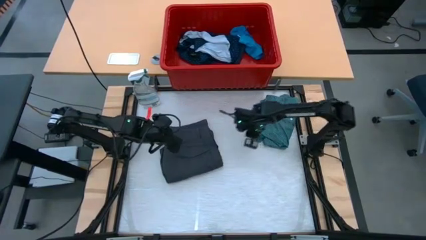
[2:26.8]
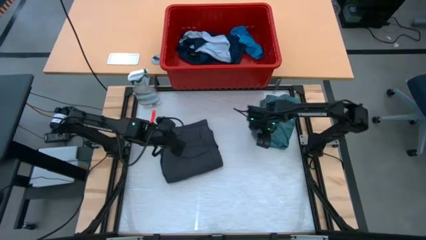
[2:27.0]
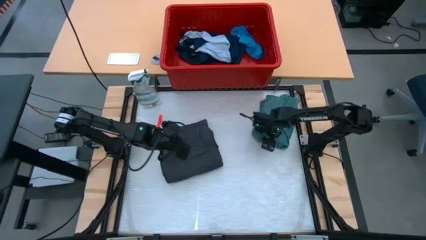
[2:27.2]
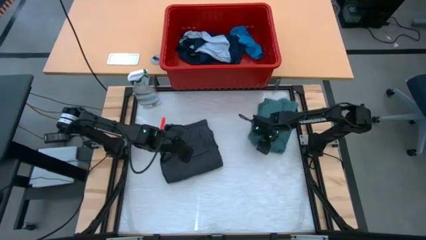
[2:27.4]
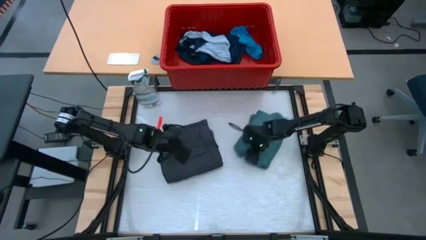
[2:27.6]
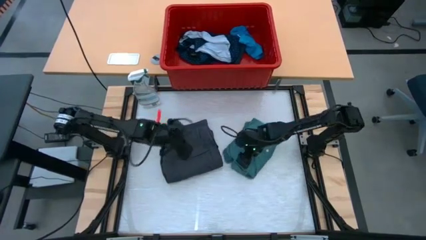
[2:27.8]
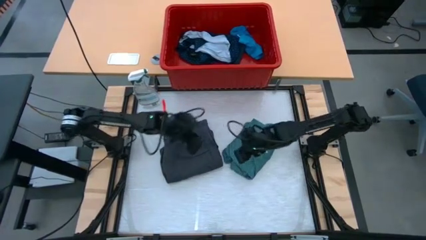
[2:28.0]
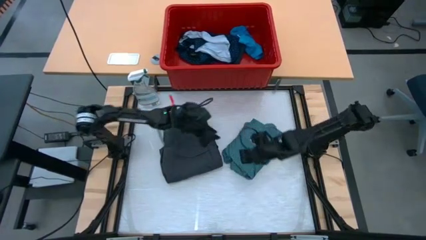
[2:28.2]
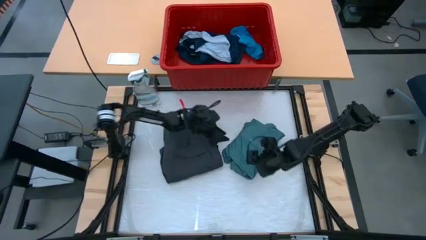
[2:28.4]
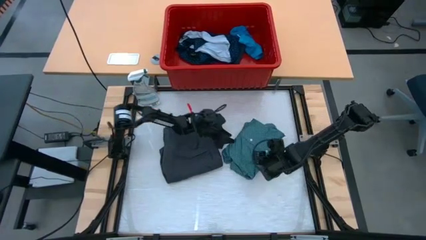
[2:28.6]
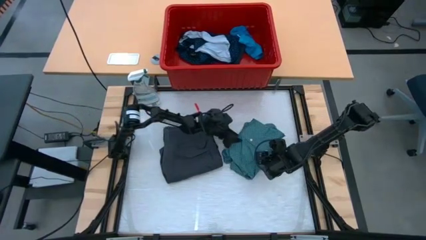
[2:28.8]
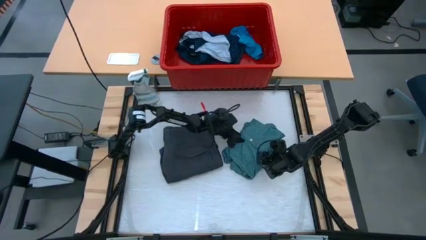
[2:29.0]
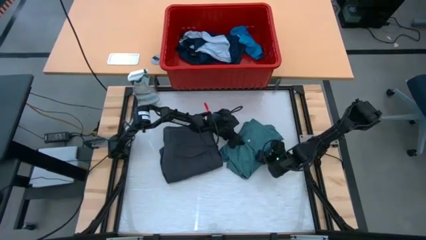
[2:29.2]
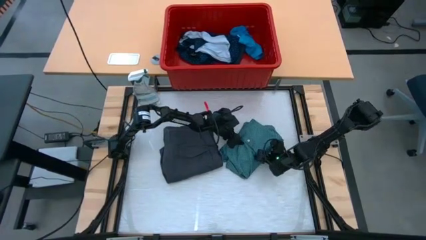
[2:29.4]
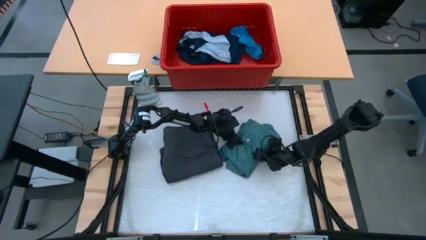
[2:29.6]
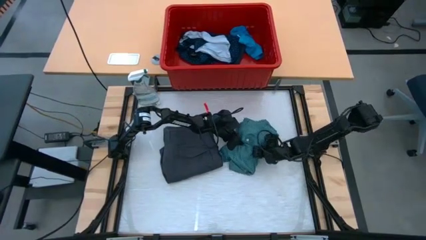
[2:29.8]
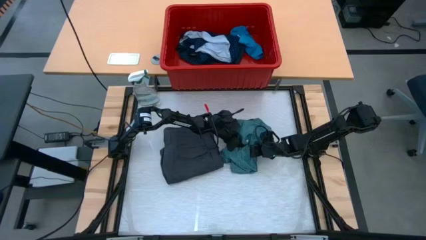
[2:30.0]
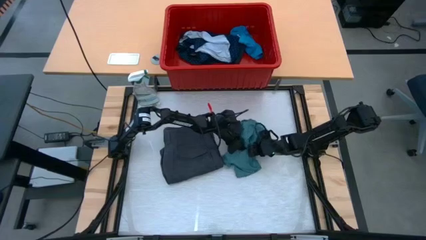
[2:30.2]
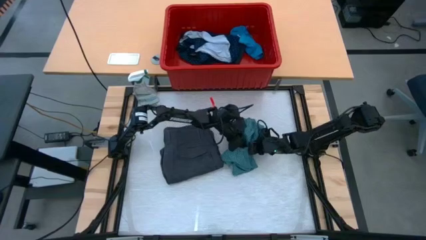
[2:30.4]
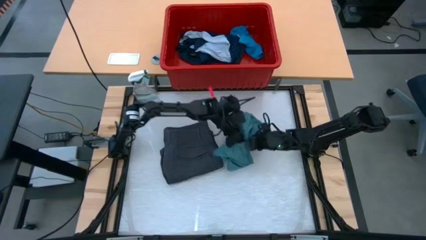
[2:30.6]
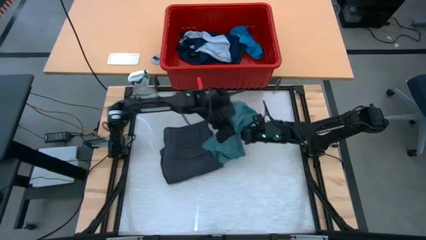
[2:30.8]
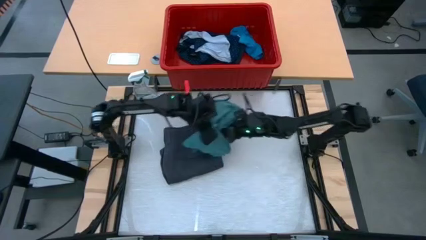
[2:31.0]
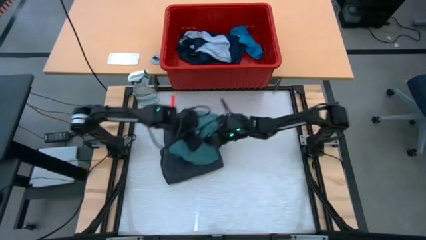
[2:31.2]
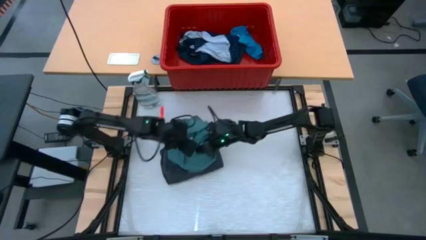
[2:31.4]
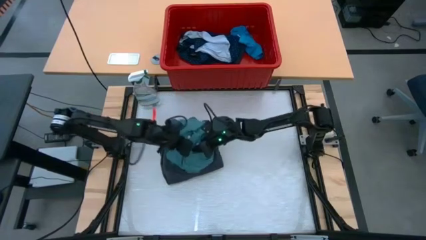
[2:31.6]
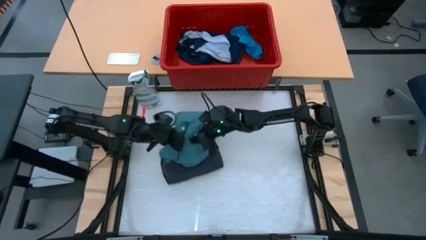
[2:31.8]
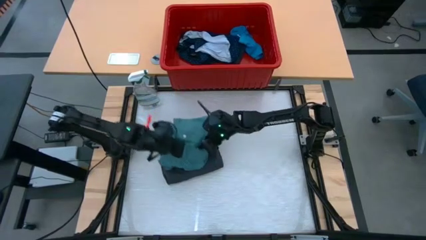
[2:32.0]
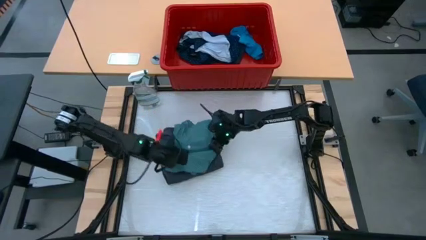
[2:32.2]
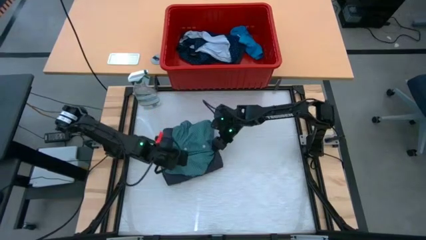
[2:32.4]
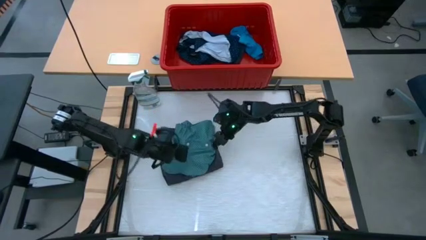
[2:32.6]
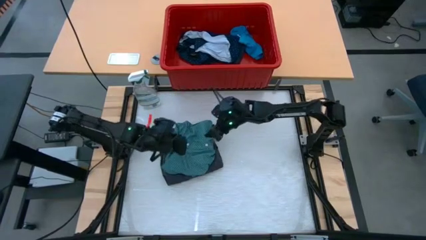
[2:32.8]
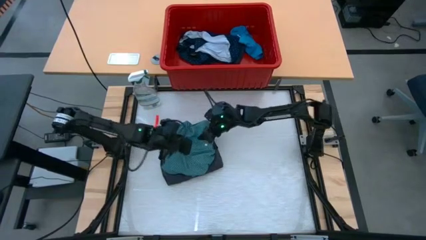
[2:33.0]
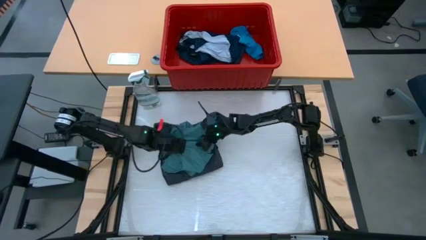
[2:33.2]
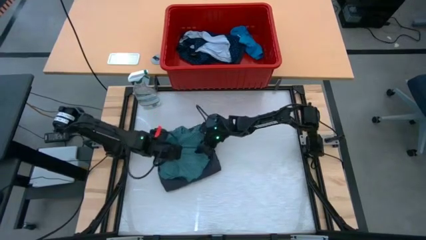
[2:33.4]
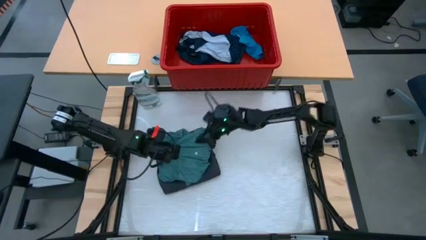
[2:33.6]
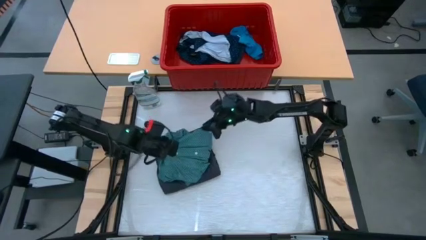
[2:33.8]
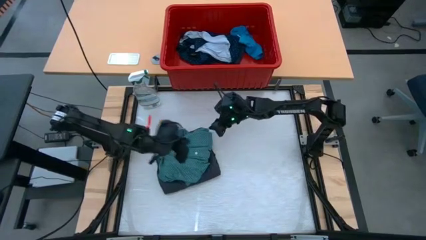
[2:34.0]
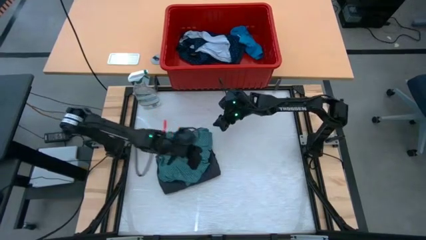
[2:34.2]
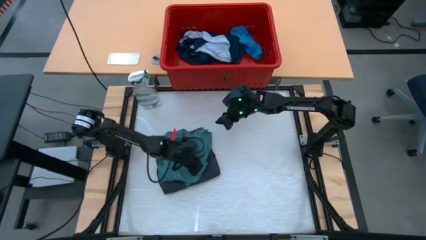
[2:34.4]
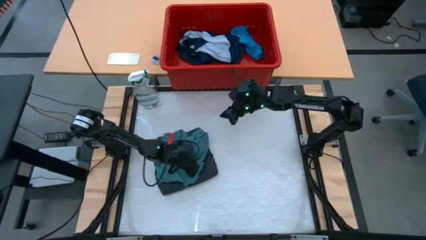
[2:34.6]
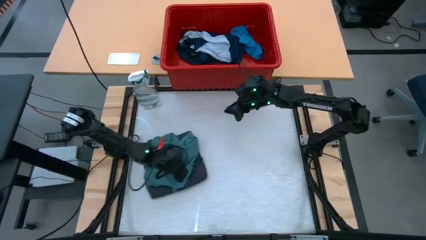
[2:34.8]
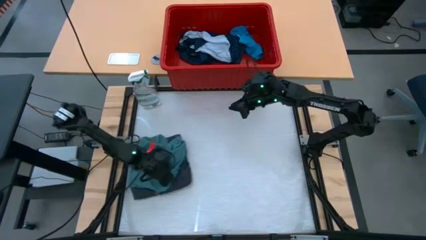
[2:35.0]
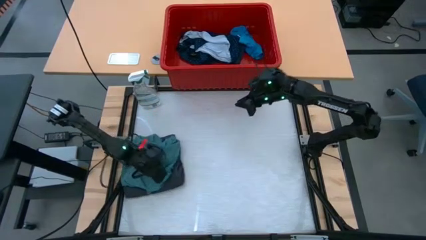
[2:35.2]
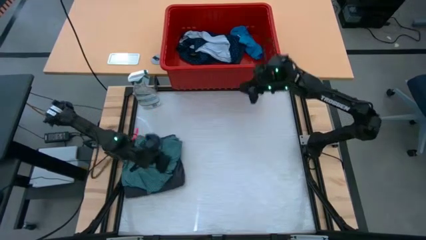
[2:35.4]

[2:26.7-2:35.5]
Task: Fold laundry
Stack the dark green shirt on top of the gray shorts

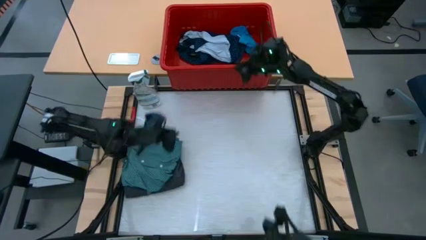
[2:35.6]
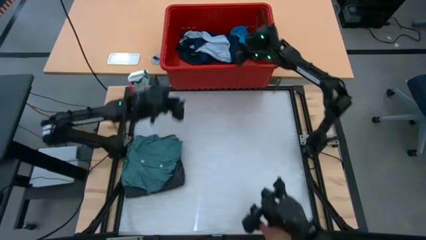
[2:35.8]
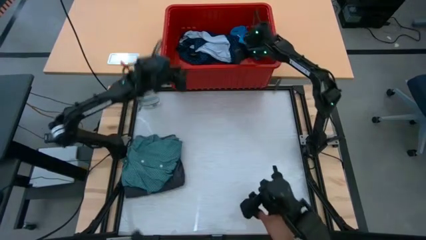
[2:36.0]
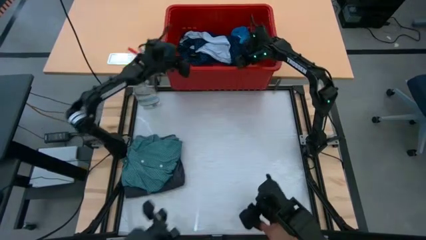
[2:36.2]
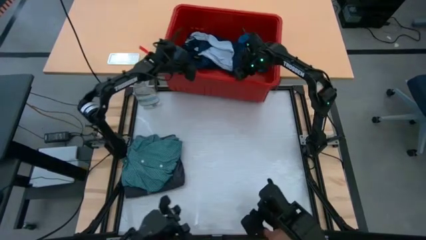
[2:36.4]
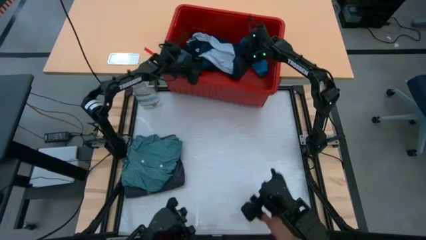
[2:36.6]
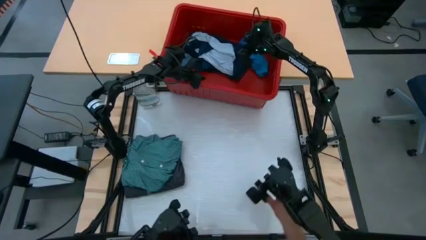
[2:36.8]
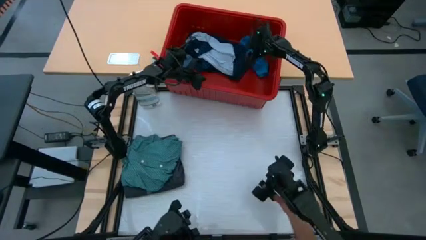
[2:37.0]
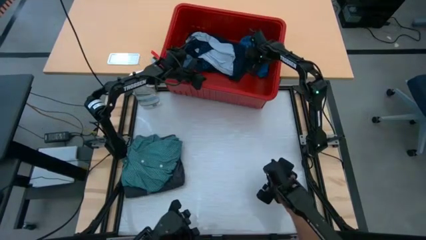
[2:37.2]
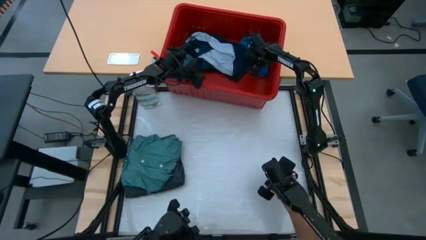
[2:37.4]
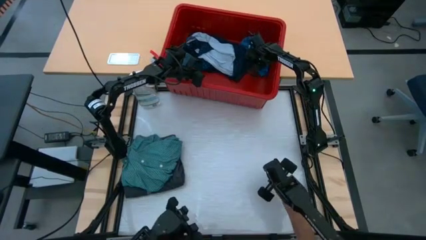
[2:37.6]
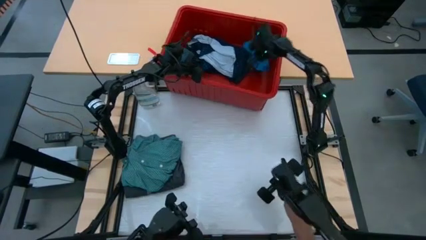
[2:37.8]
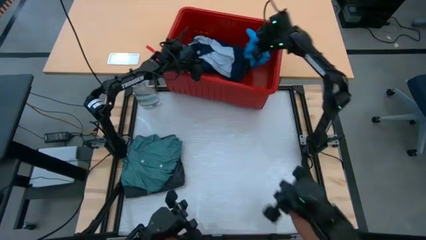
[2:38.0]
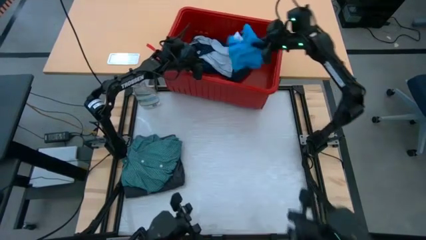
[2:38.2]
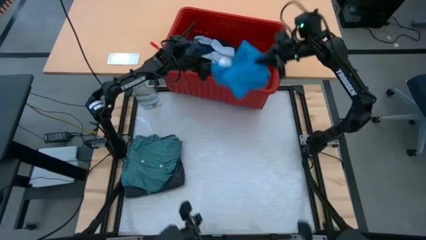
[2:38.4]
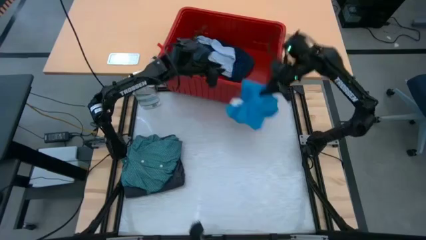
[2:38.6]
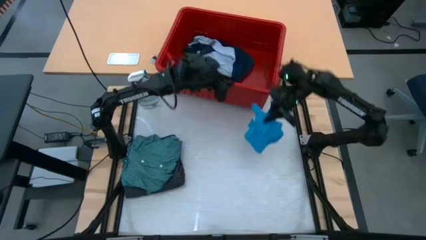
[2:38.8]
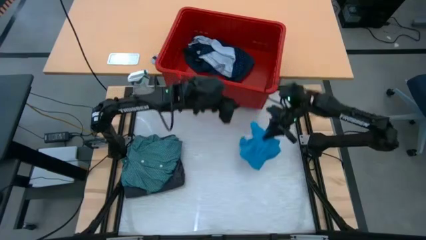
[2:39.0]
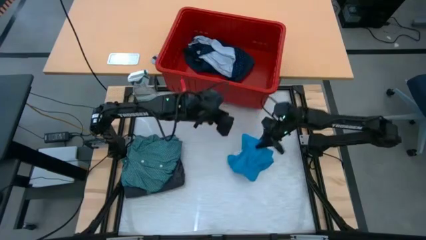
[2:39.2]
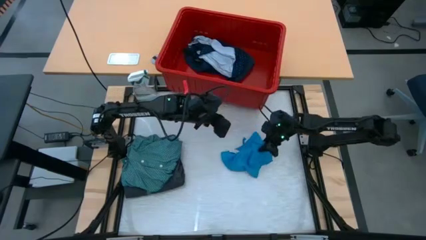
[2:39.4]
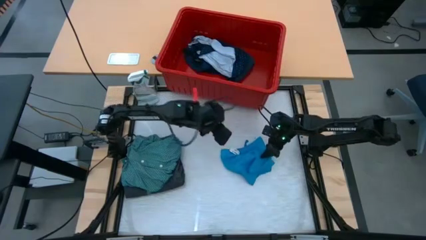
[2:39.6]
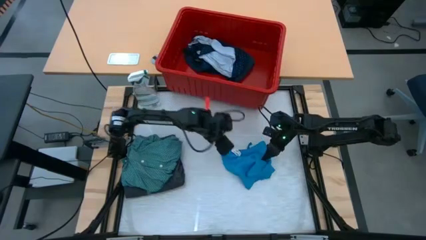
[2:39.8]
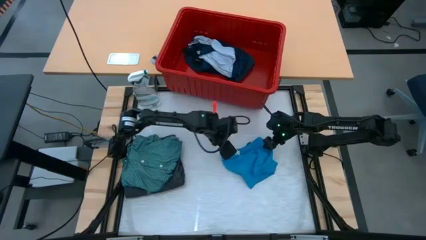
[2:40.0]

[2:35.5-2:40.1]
Remove the light blue shorts from the red bin

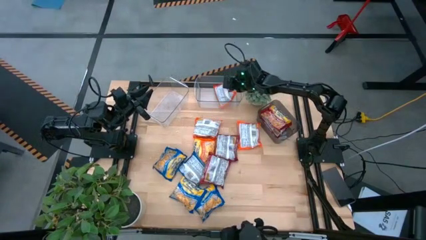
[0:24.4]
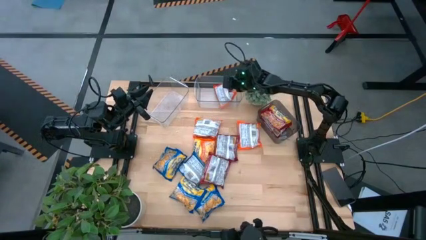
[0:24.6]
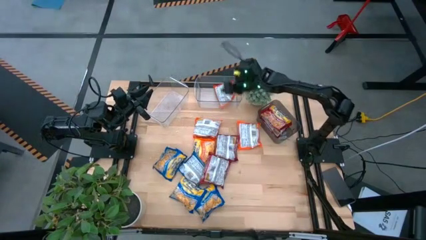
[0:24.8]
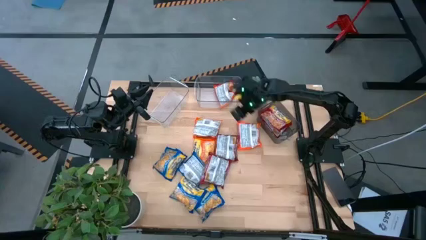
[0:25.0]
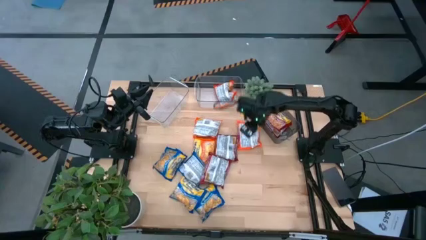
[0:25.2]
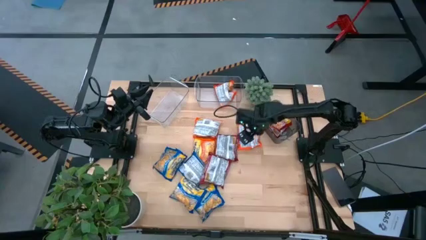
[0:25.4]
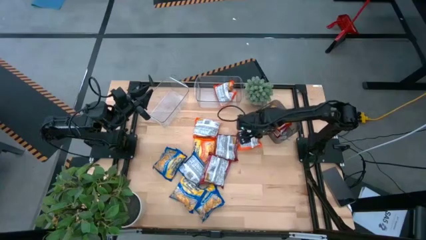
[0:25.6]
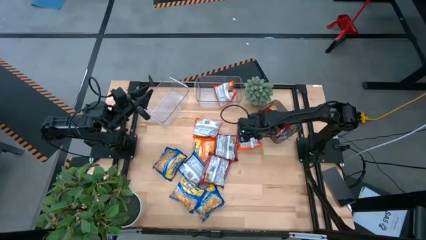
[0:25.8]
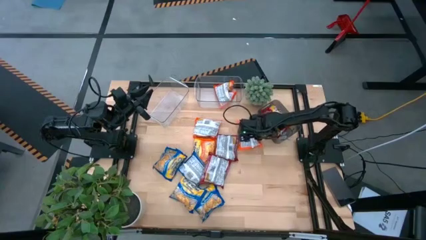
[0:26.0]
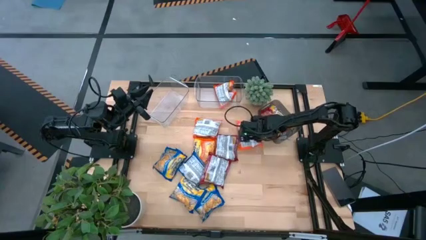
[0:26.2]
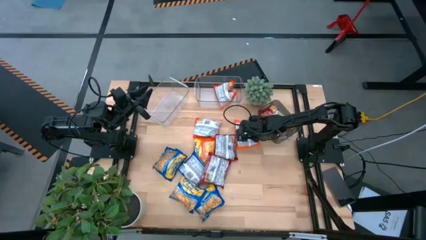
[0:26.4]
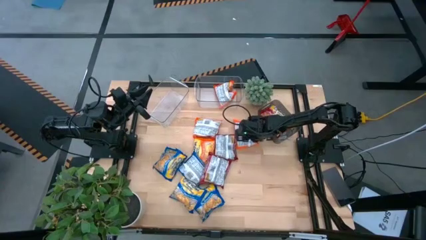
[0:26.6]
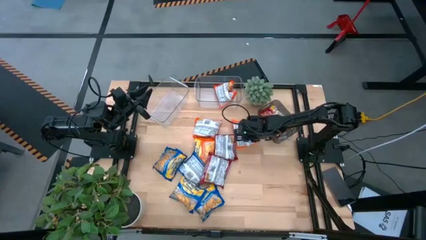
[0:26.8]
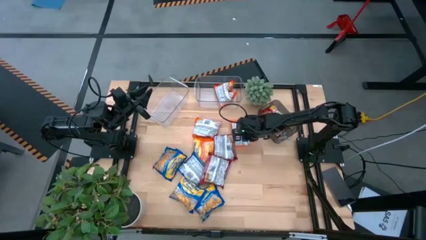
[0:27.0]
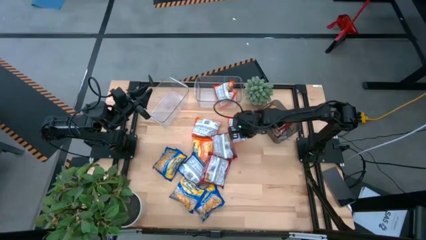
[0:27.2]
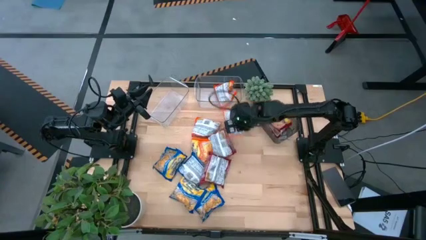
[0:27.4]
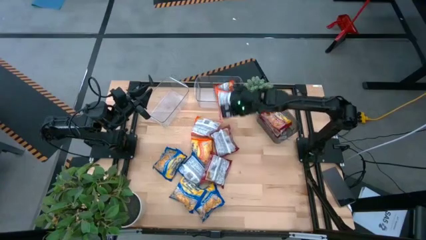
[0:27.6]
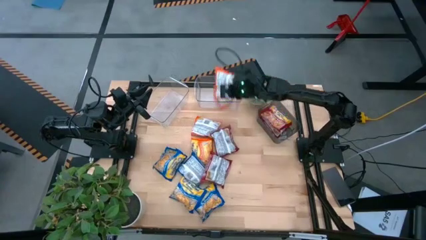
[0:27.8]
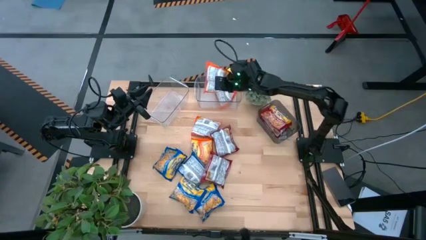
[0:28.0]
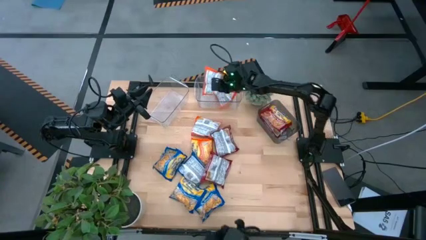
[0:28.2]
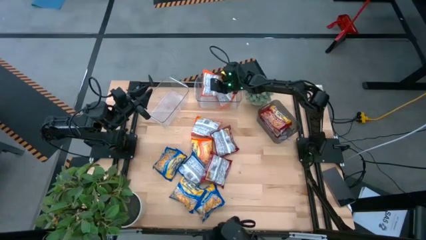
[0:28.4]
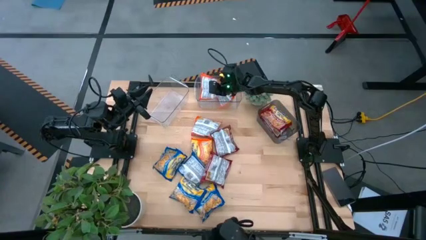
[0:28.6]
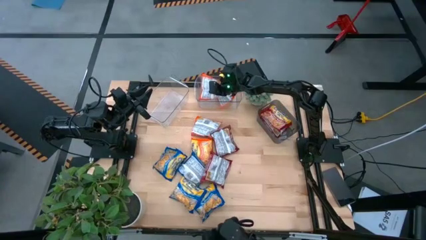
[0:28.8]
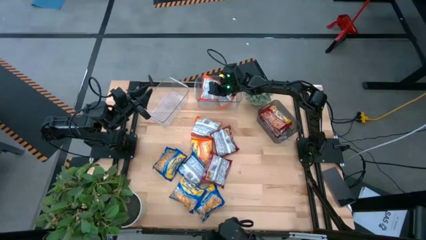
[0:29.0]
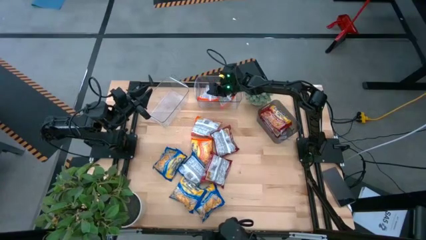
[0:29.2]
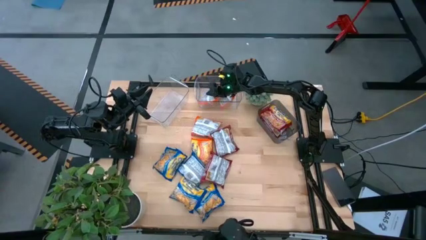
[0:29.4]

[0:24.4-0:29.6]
Task: Sort Maruchan noodles
Put the orange noodle pack into the right transparent bin
